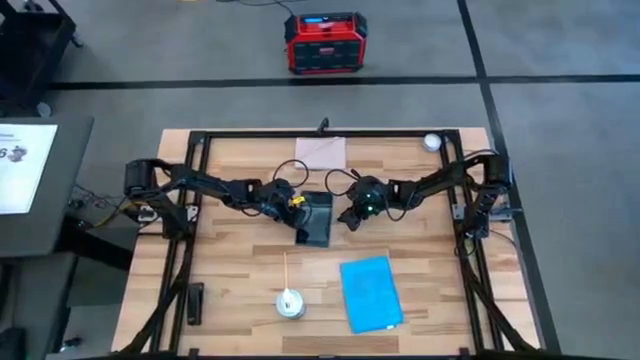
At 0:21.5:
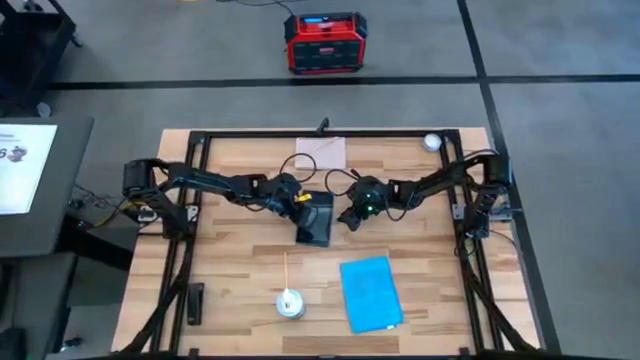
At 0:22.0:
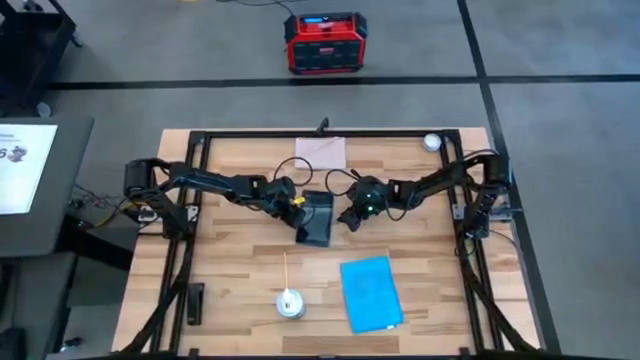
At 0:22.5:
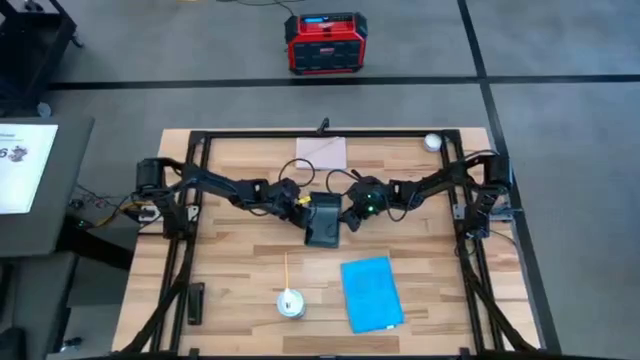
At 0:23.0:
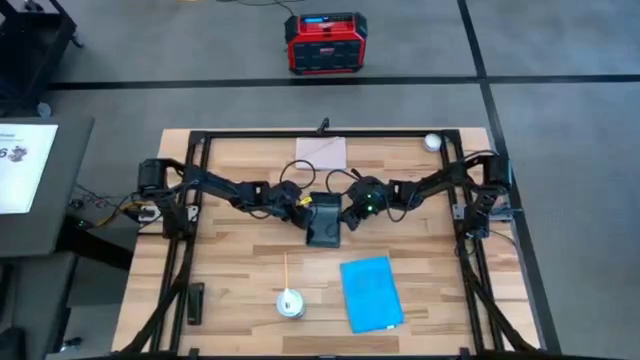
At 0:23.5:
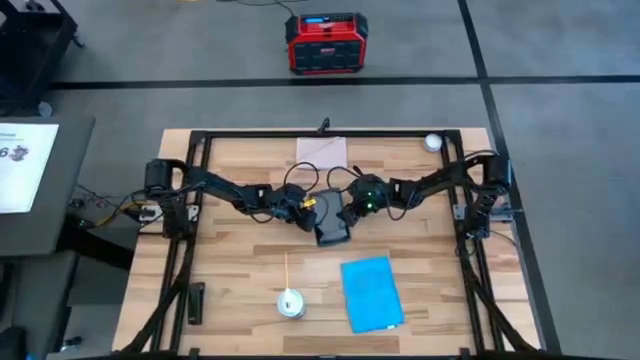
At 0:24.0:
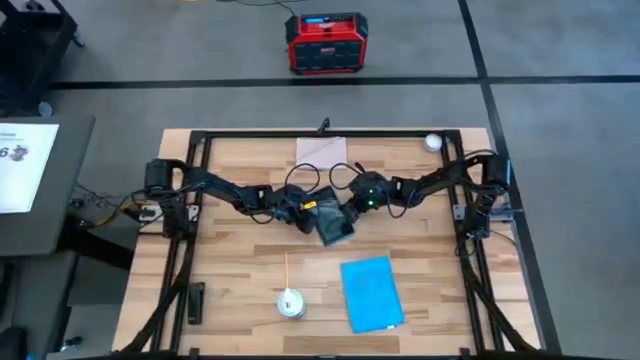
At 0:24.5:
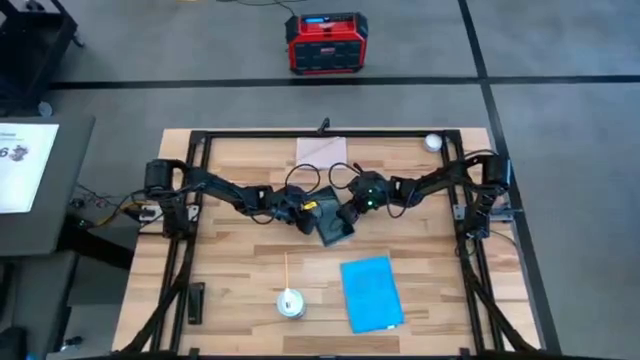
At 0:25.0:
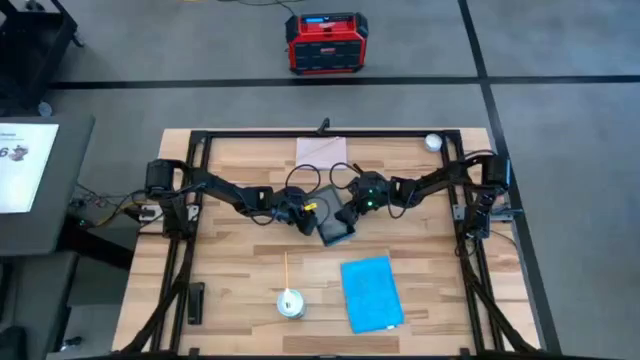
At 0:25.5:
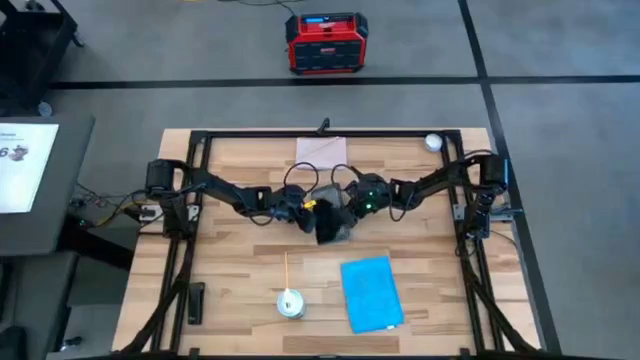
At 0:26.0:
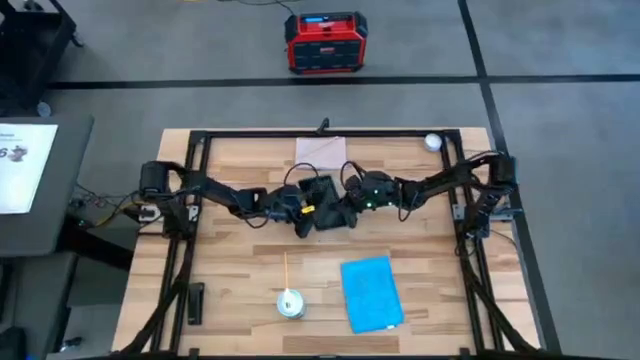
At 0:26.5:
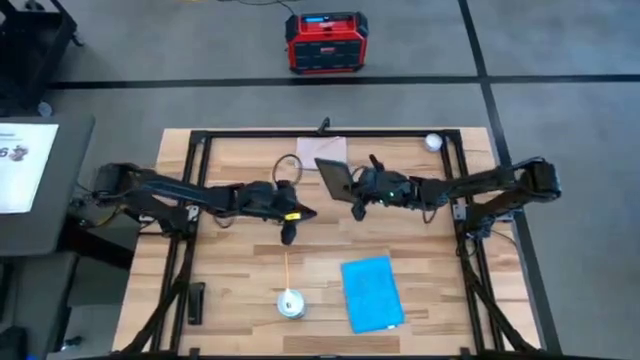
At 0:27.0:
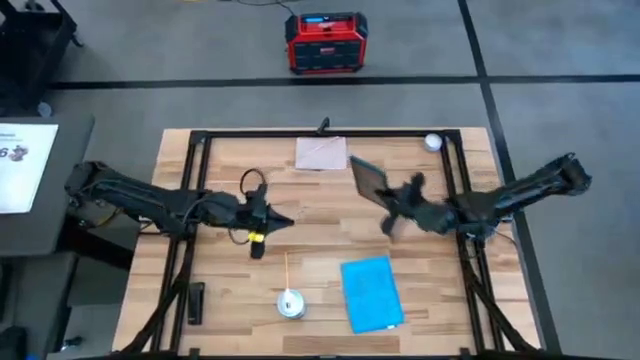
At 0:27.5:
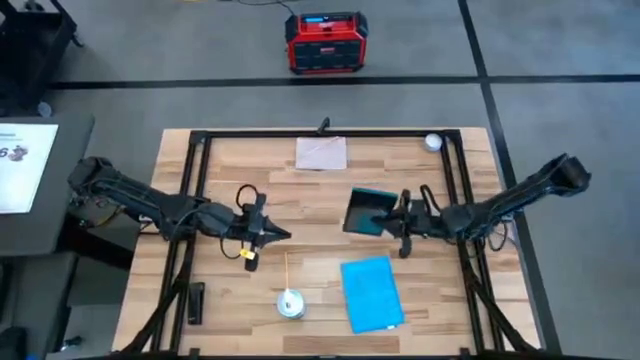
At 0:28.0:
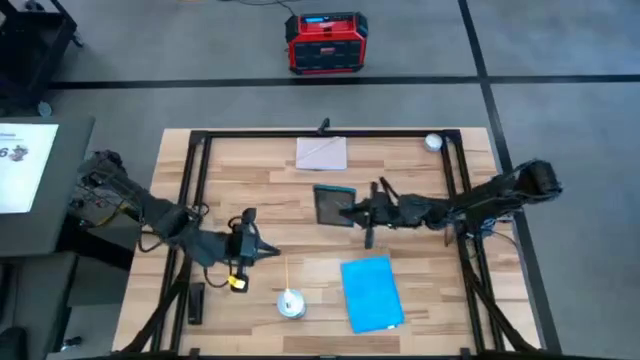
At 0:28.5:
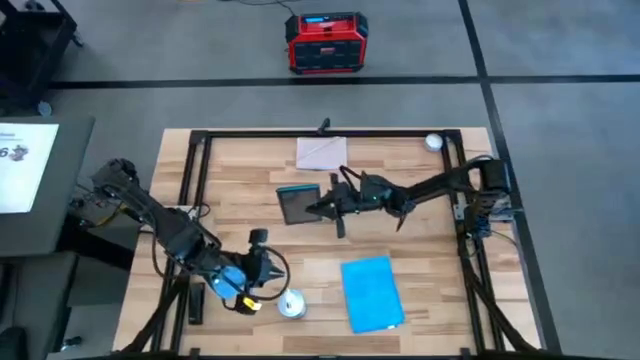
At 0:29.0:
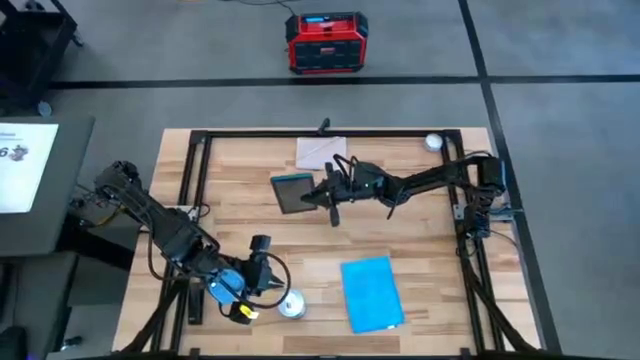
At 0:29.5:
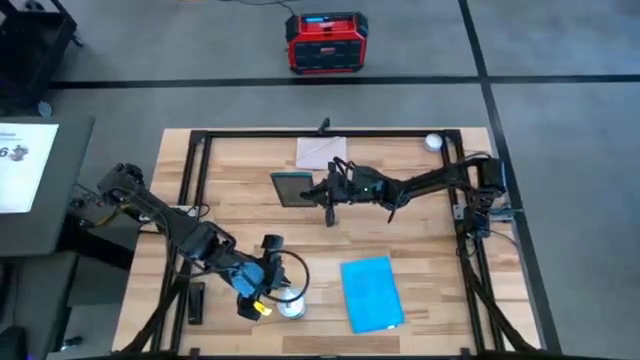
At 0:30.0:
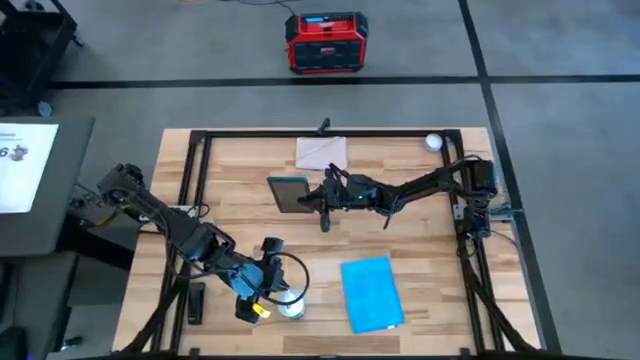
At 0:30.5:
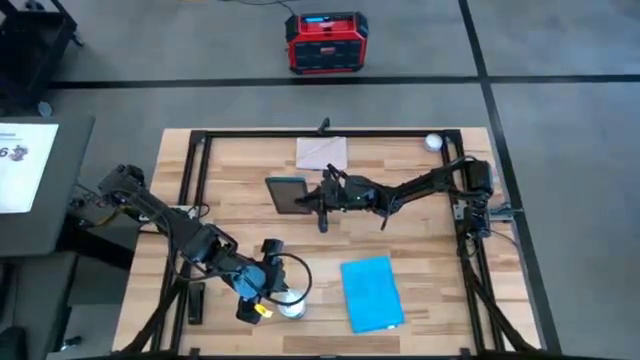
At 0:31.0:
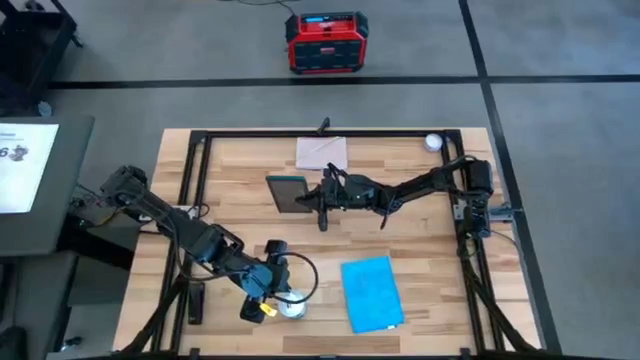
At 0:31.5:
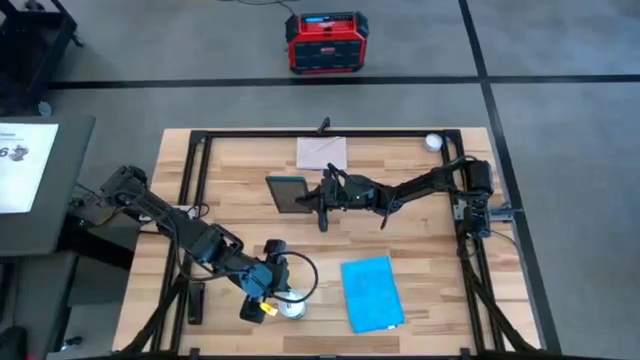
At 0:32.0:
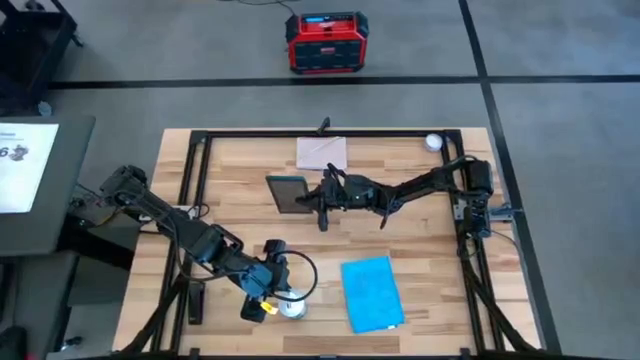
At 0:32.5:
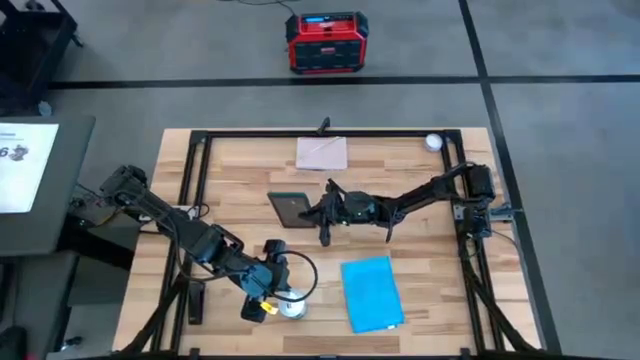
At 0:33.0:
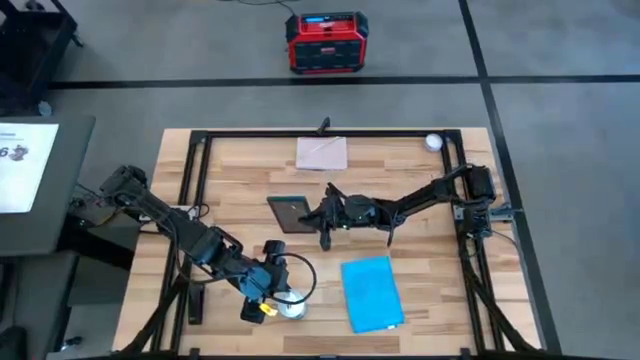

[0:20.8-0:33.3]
Task: Apply microfiber cloth
Spray the front of the tablet using the spray bottle

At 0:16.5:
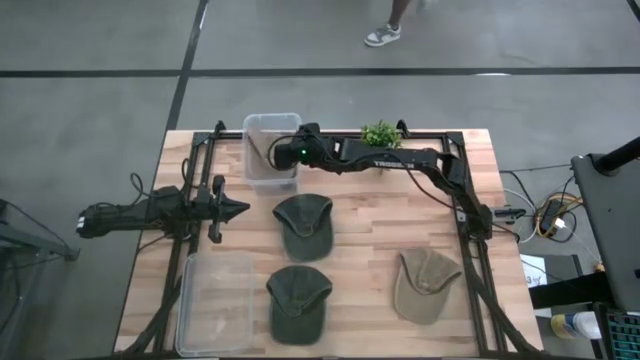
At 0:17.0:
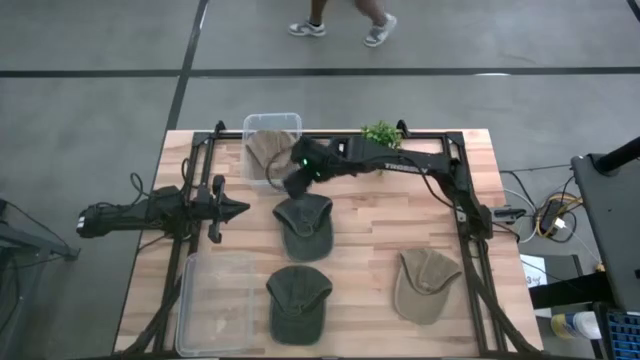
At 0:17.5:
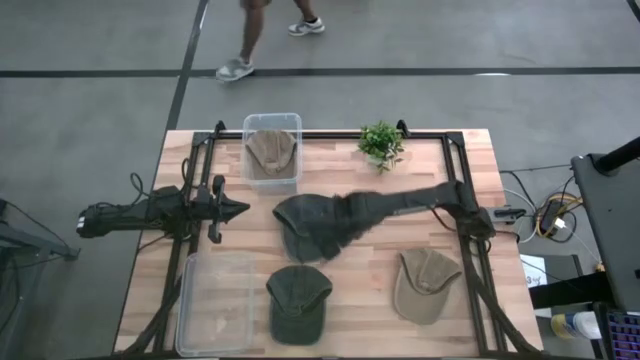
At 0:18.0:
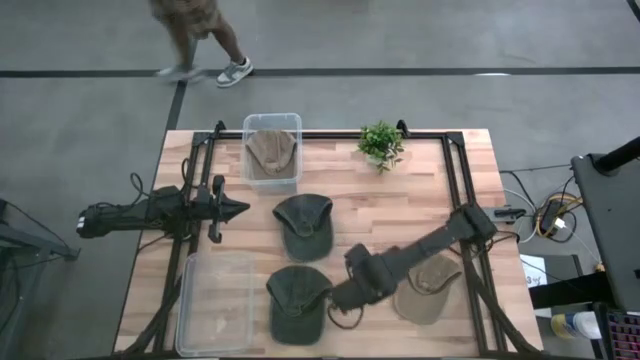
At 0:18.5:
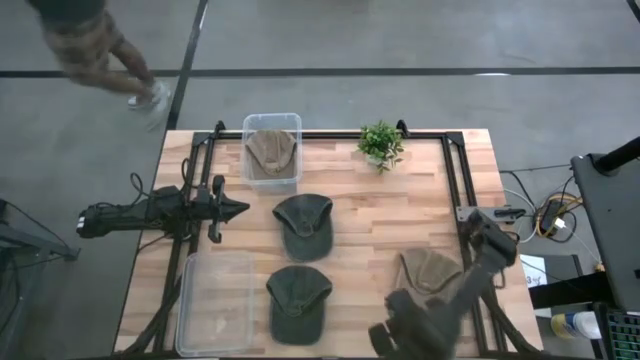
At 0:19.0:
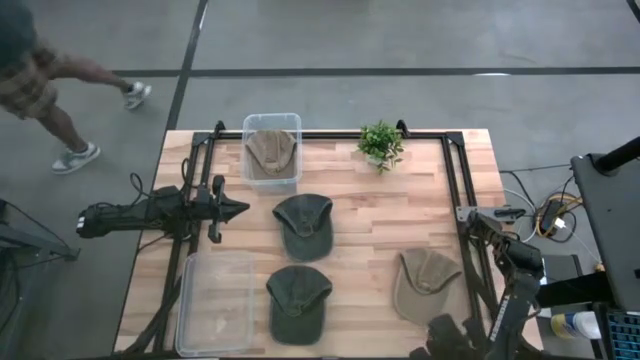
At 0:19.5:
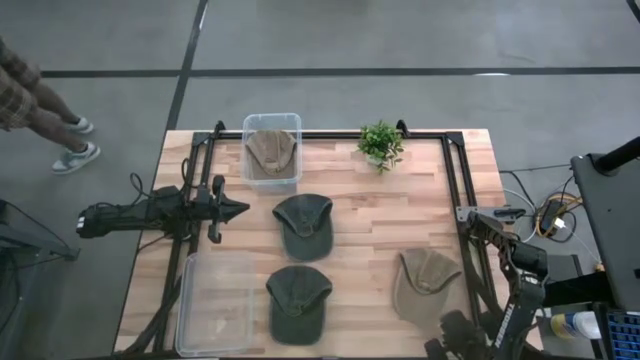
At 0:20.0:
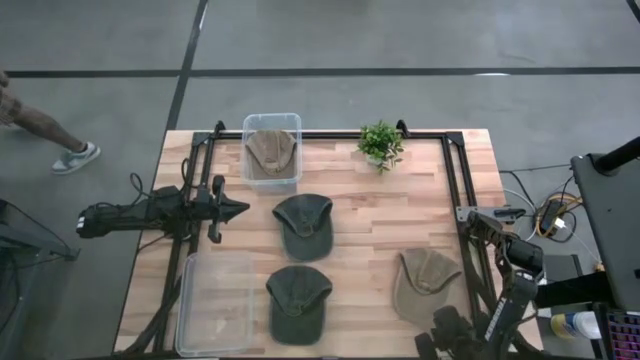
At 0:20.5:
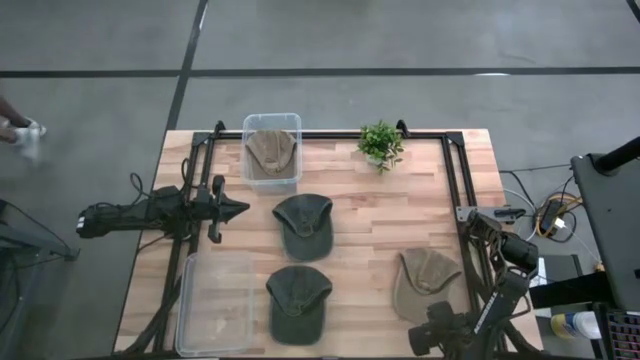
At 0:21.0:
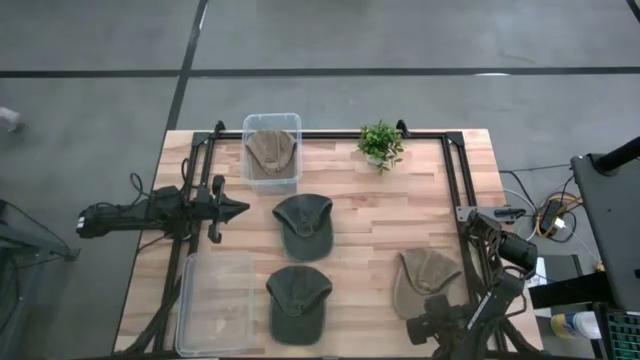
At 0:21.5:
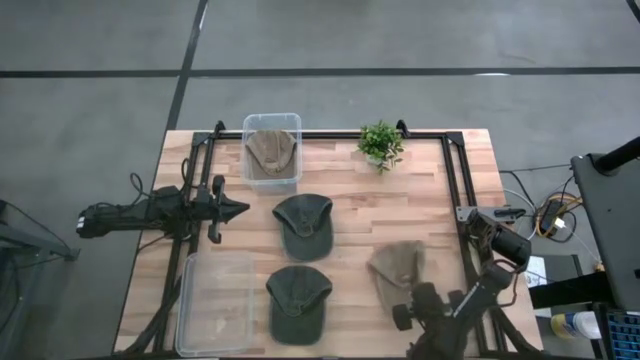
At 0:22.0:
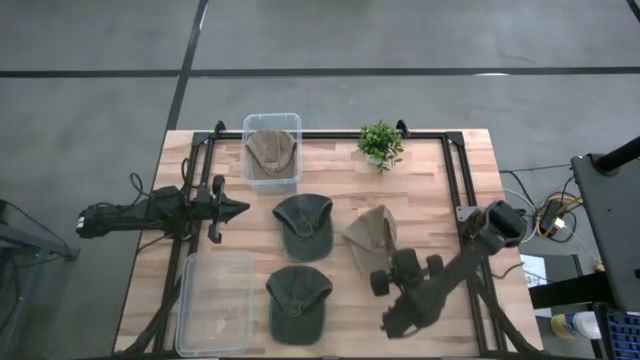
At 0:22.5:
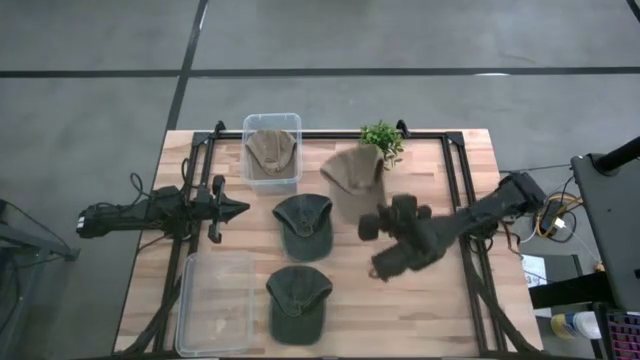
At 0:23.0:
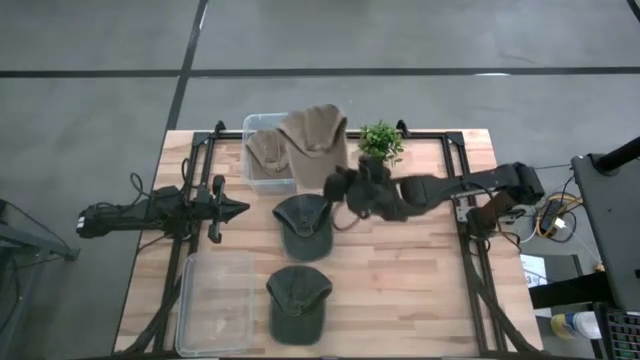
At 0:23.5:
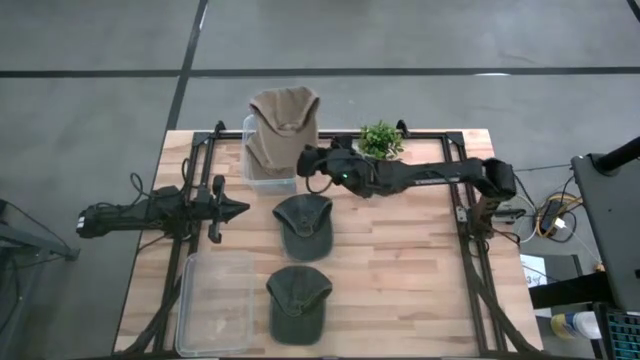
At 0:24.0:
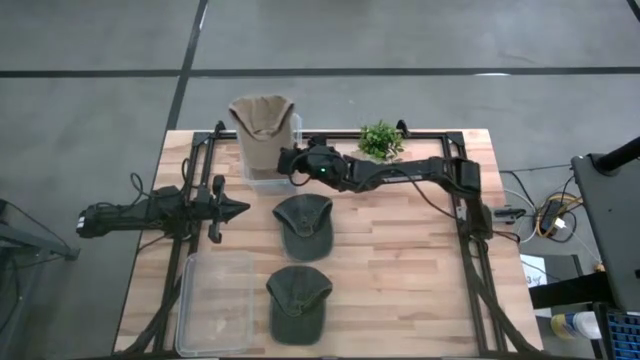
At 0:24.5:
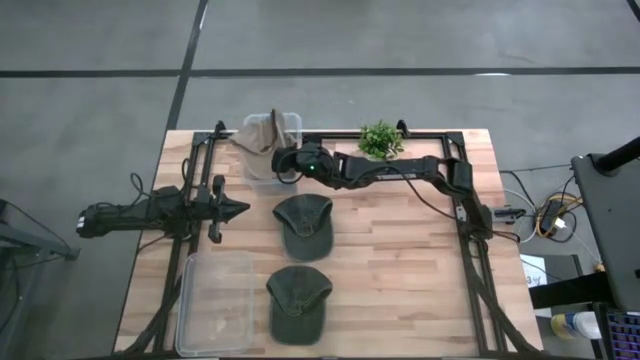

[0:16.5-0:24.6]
Task: Pick & Place hat
Put the brown cap into the top transparent cap
